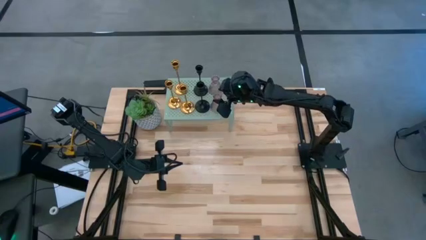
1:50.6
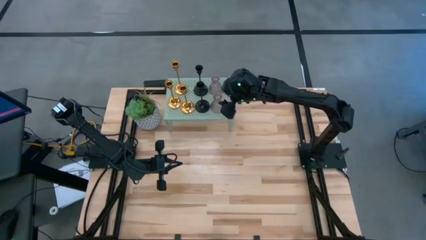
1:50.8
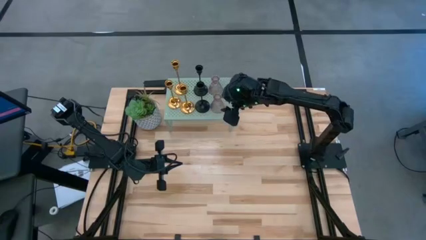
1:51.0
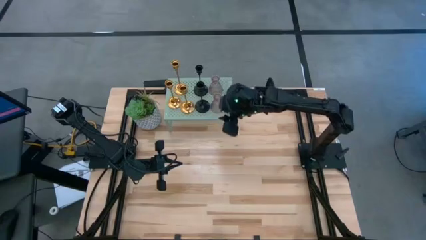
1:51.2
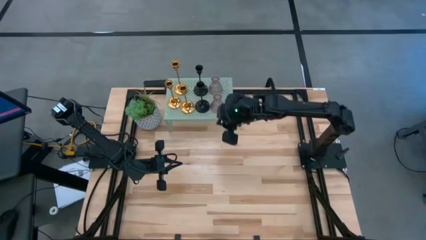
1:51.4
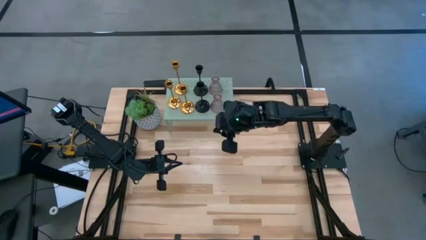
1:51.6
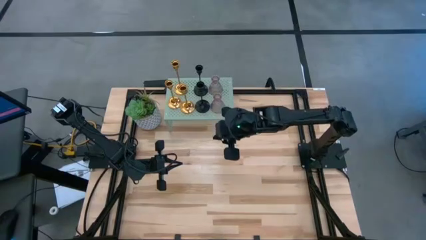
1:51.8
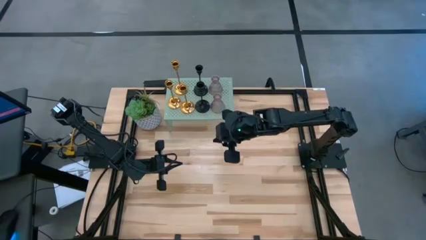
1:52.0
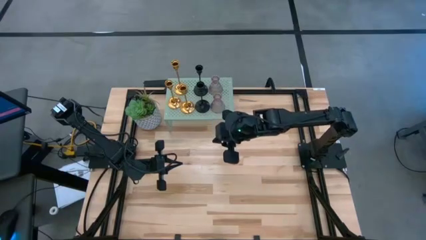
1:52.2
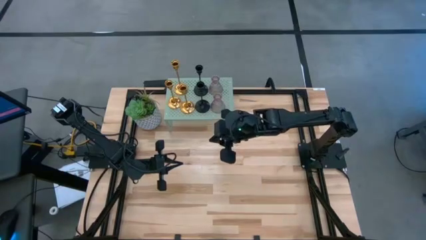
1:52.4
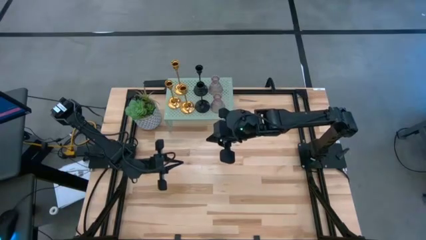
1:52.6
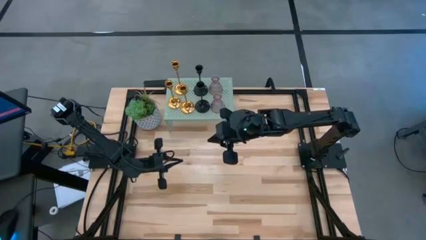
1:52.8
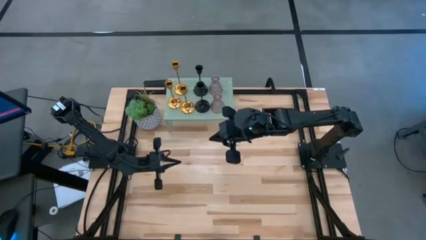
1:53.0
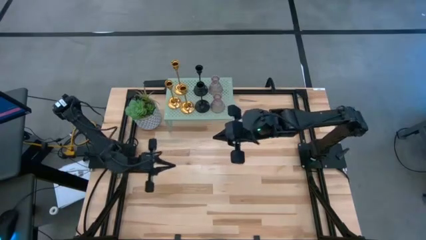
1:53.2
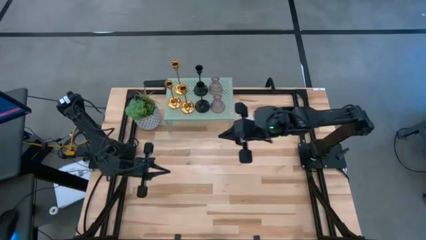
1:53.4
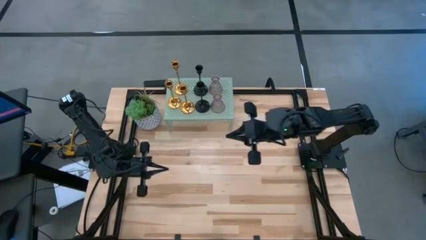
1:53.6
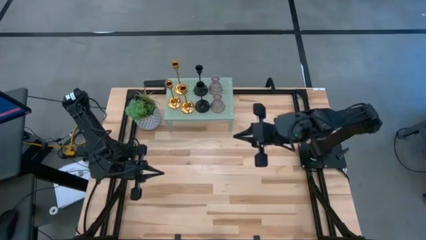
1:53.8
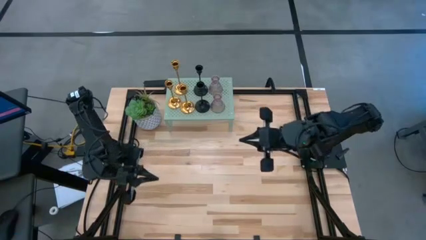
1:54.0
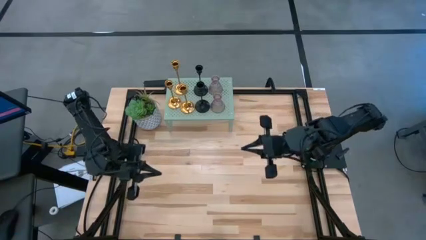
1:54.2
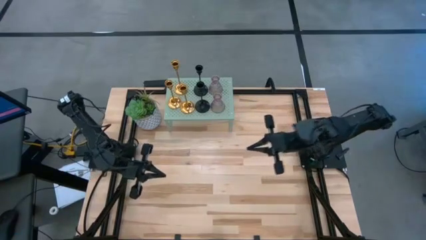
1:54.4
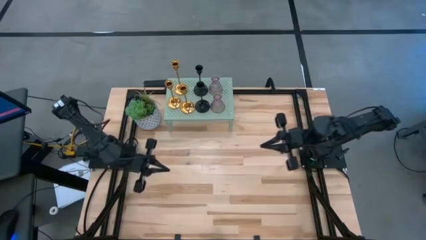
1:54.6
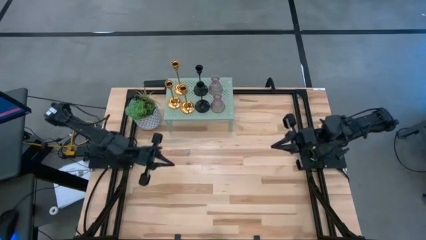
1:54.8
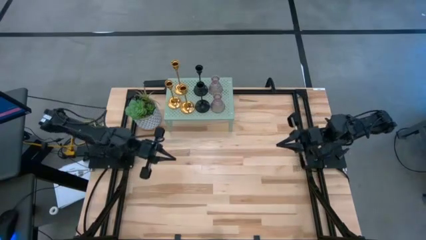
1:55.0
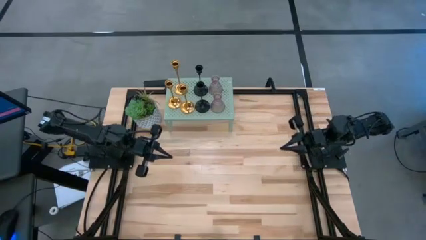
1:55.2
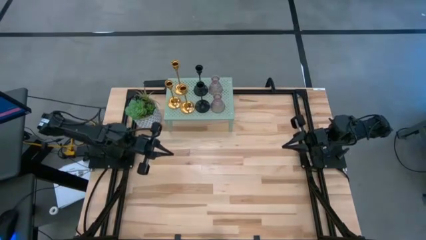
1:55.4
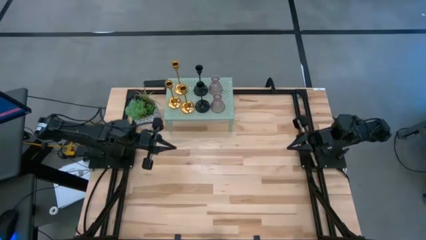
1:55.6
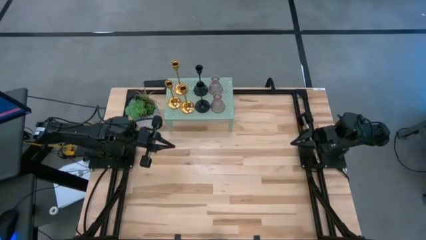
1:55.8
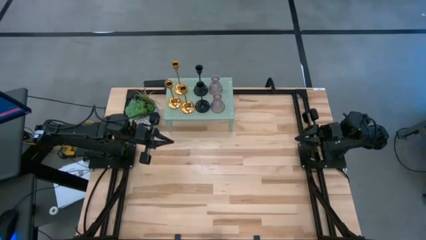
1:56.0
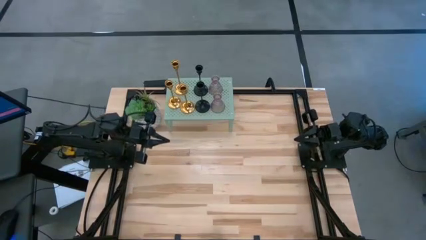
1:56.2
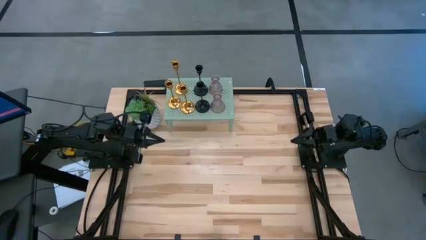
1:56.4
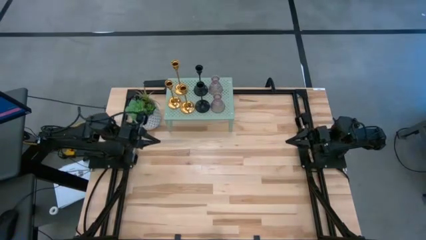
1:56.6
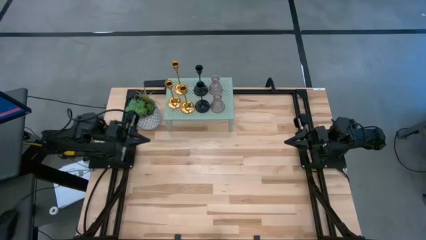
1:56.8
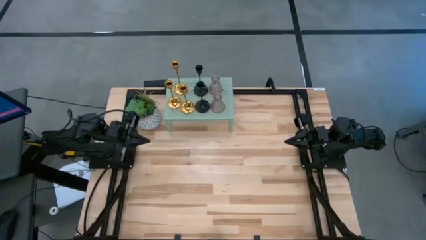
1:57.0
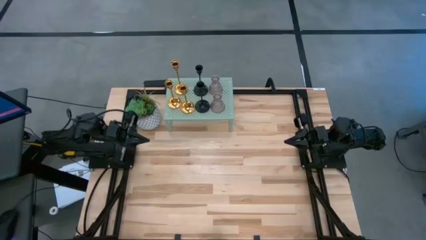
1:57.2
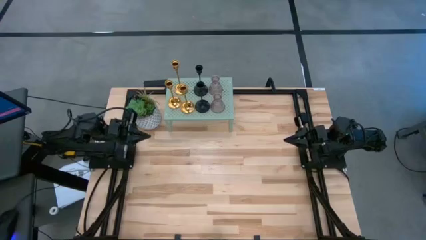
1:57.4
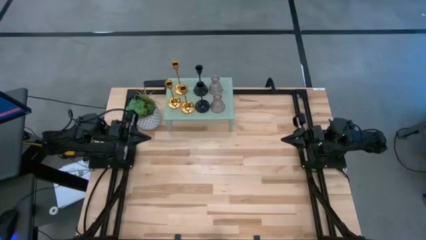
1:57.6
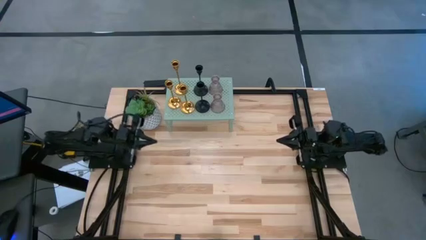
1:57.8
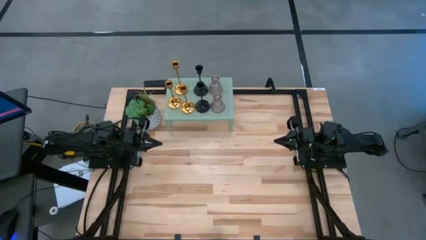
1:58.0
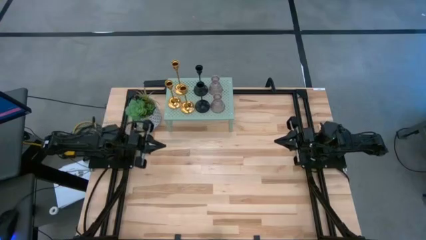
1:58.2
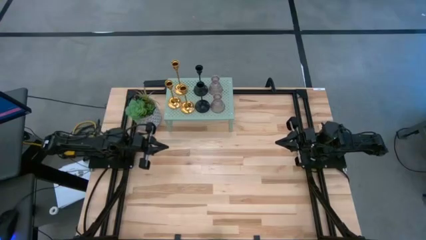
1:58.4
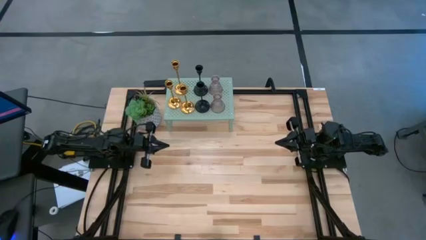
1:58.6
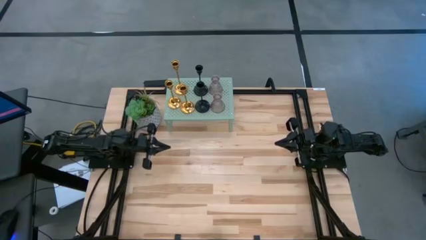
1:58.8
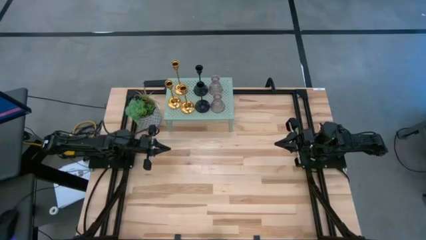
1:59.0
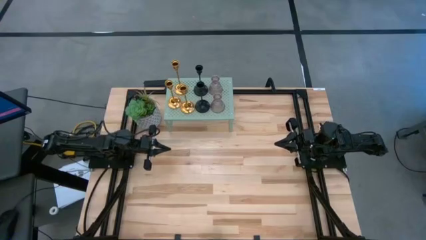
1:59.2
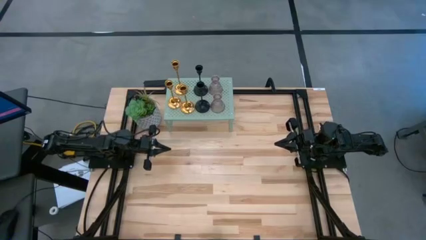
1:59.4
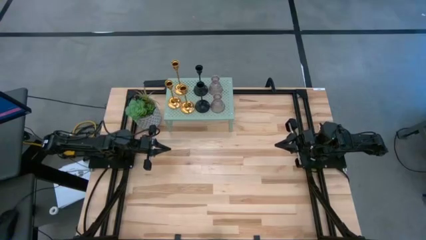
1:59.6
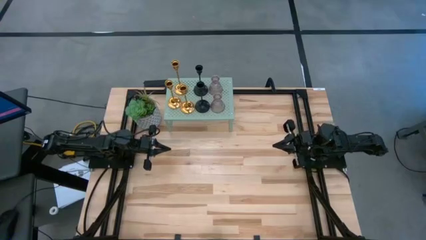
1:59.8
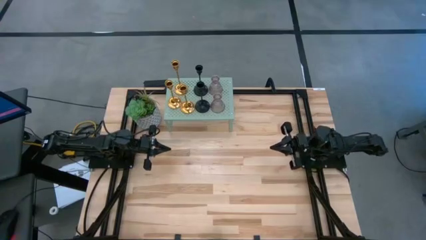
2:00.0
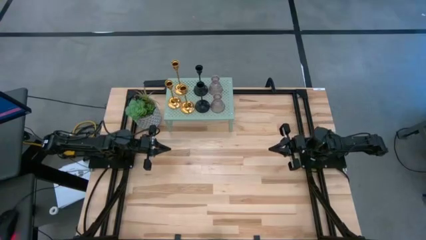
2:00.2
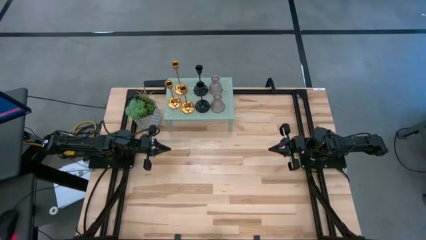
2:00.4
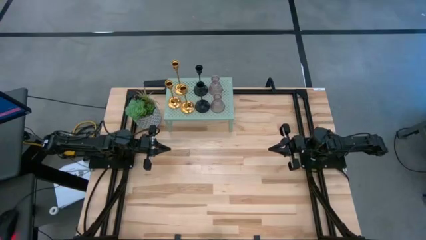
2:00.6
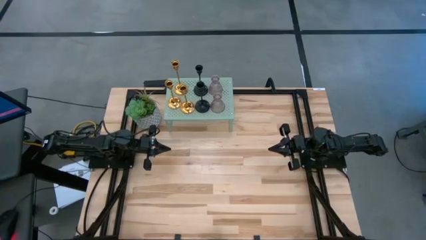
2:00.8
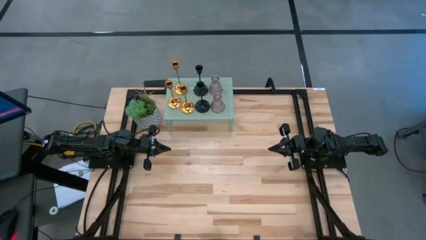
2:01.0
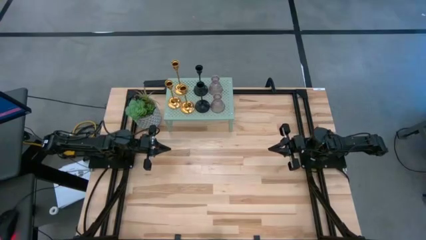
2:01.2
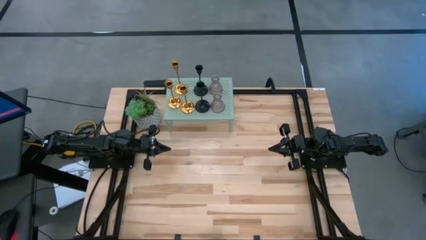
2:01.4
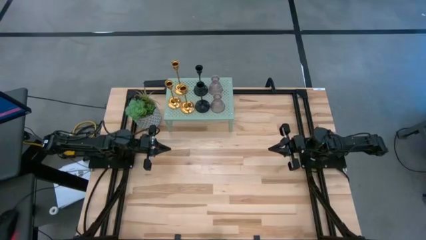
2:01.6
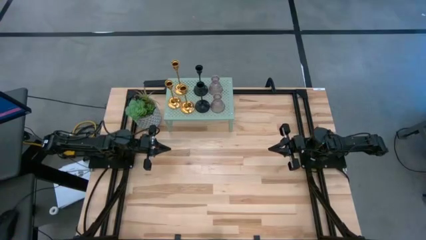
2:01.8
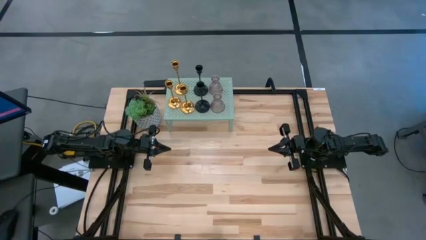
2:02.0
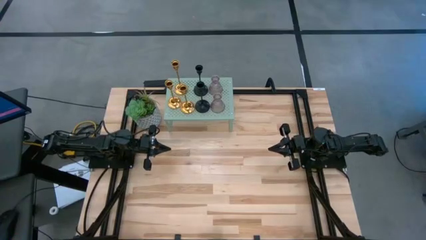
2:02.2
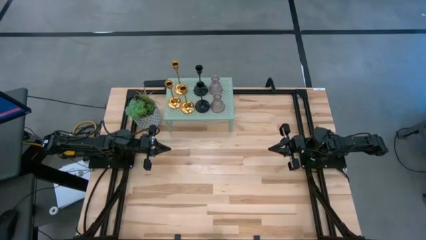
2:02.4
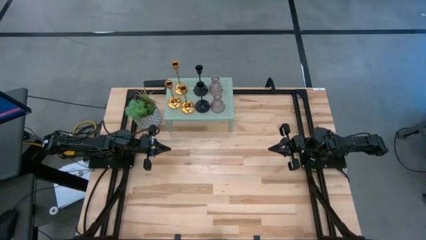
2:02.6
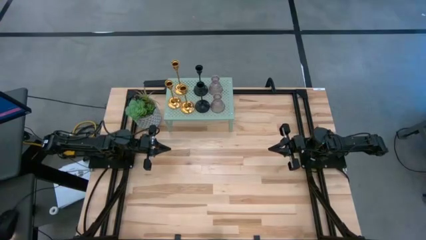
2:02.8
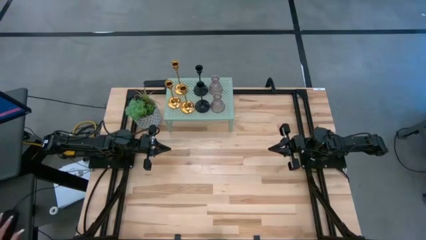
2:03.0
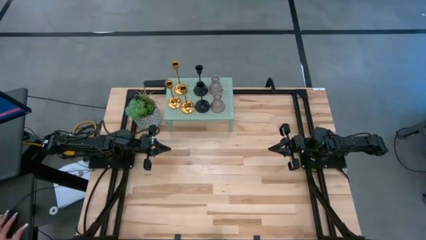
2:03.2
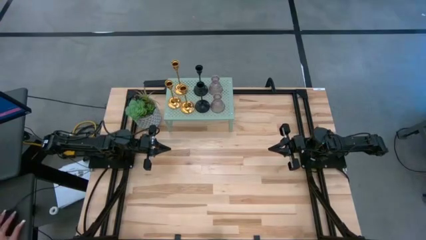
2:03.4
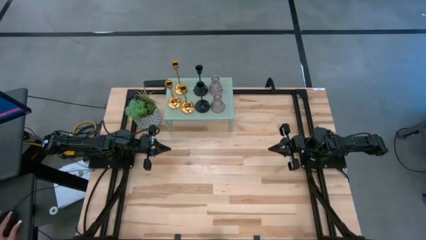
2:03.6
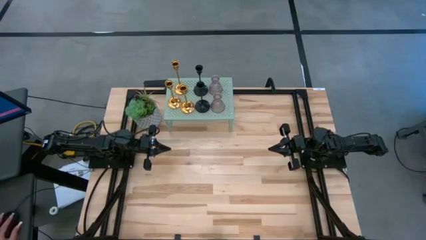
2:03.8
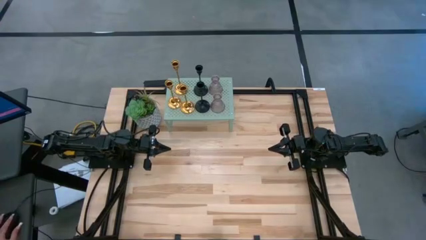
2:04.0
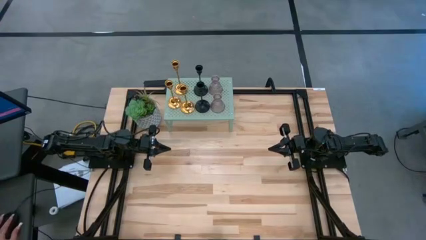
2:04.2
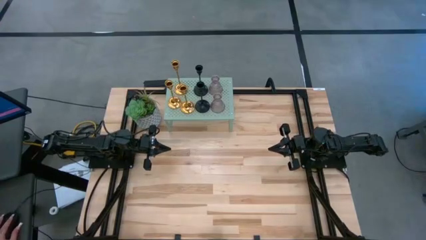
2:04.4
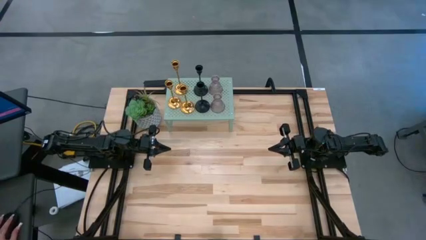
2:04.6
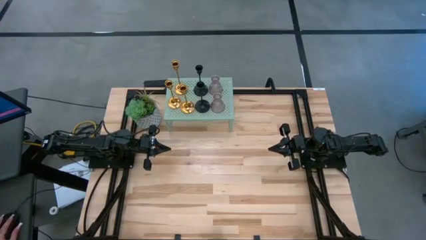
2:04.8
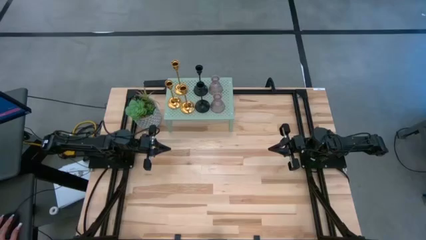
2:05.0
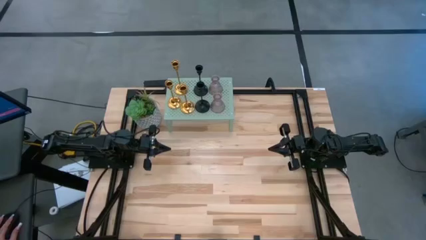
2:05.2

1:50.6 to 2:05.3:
Task: Pick & Place candle stick holders
Return to Home Position

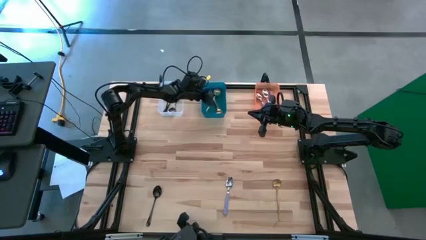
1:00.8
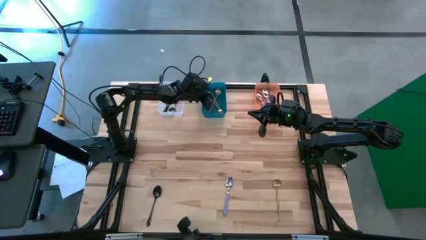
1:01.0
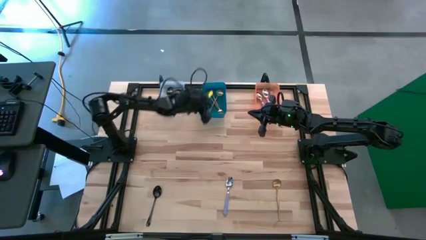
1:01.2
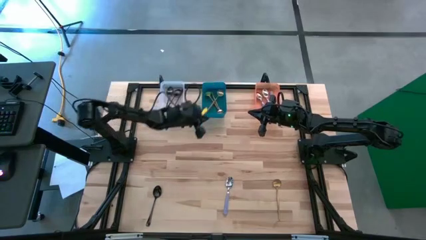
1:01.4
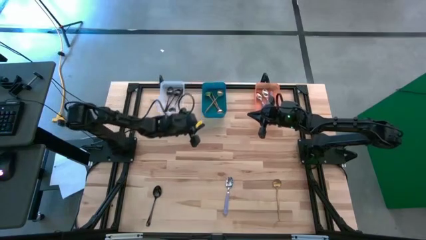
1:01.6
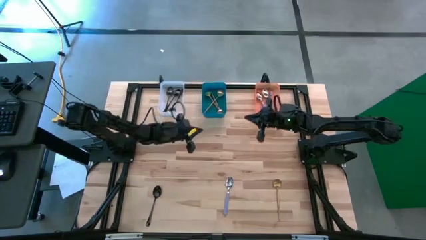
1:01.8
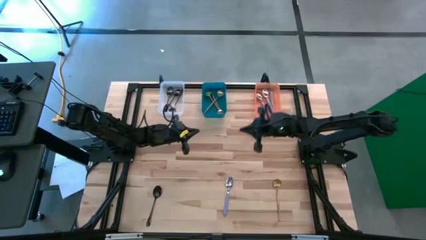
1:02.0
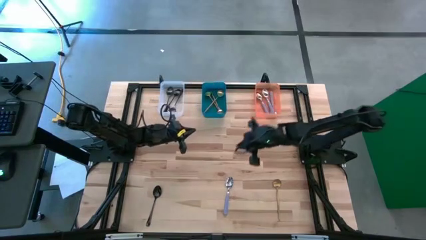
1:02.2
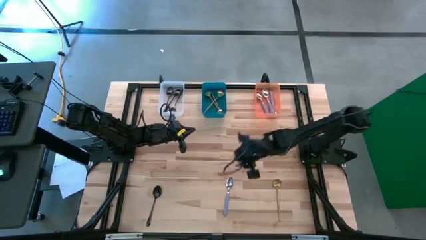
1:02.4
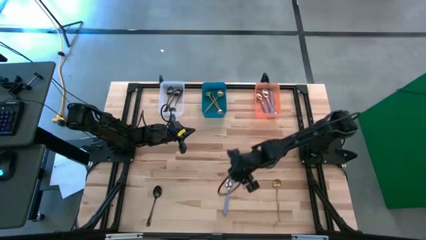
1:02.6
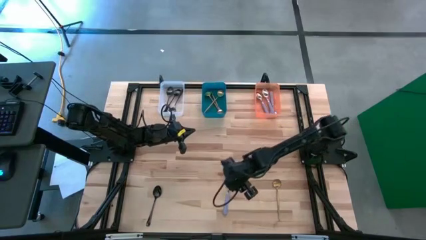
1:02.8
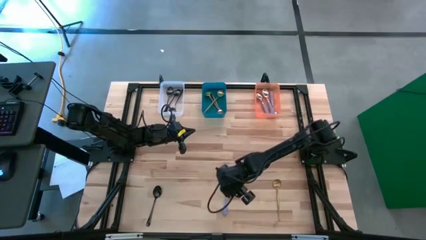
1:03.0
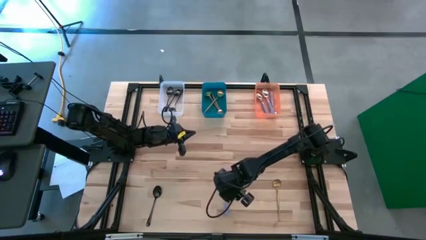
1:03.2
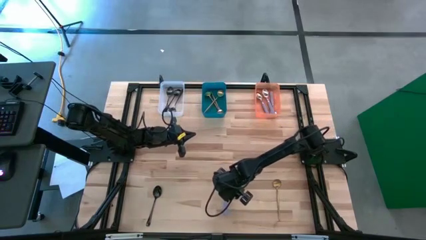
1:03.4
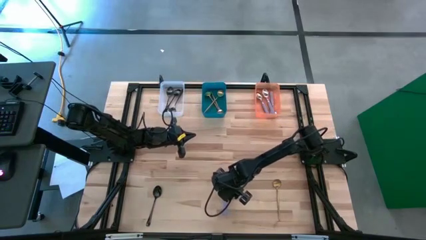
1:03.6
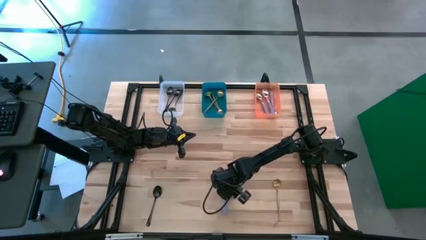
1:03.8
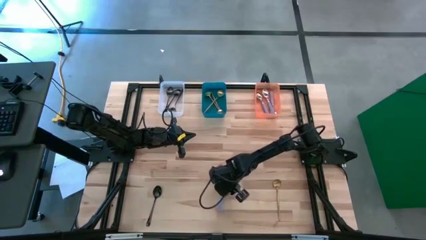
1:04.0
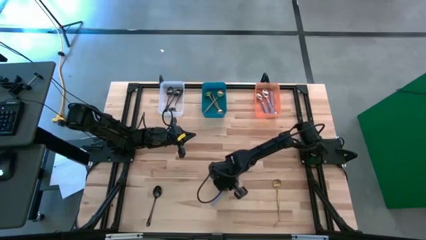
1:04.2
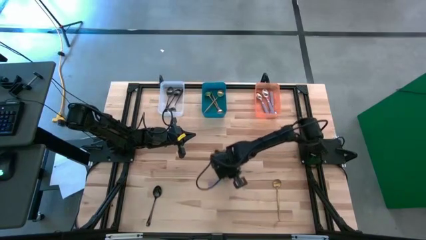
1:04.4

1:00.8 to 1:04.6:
Task: Sort silverware by color (type)
Put the purple spoon into the orange bin
